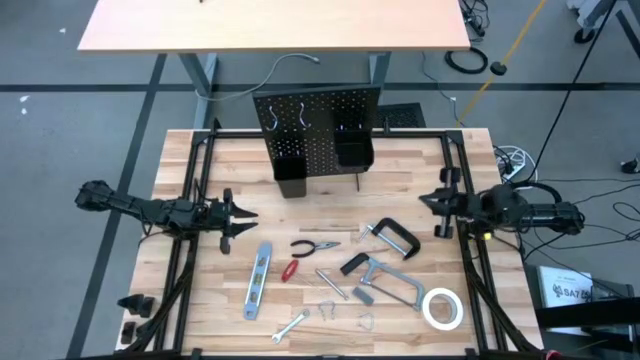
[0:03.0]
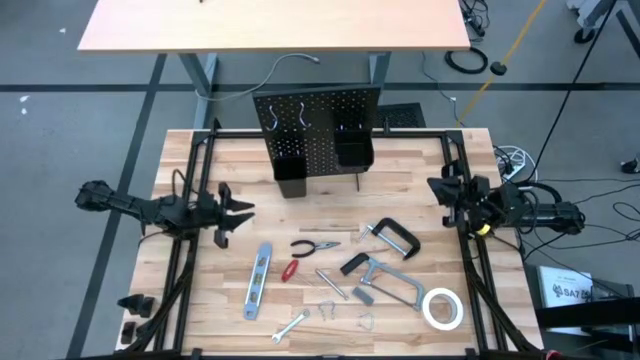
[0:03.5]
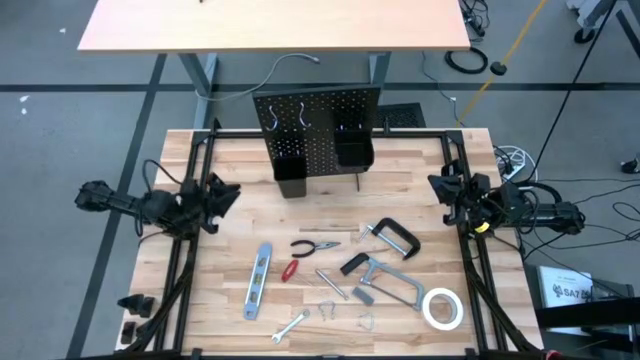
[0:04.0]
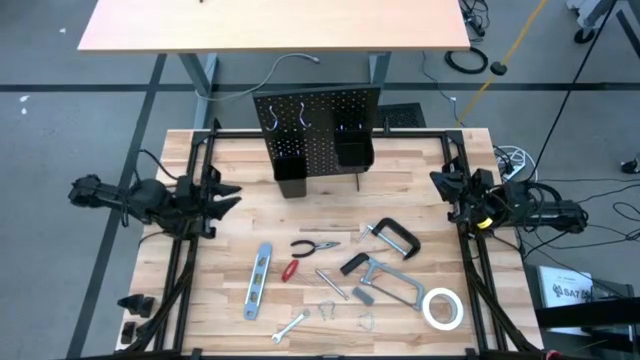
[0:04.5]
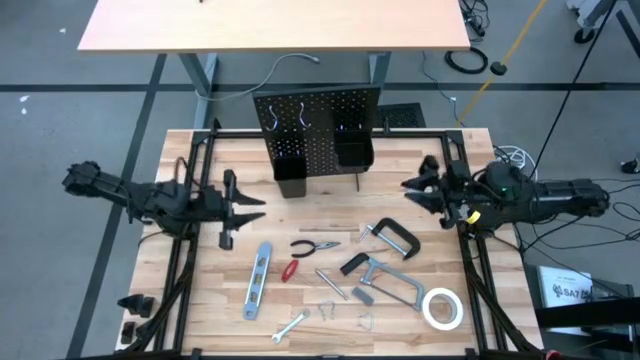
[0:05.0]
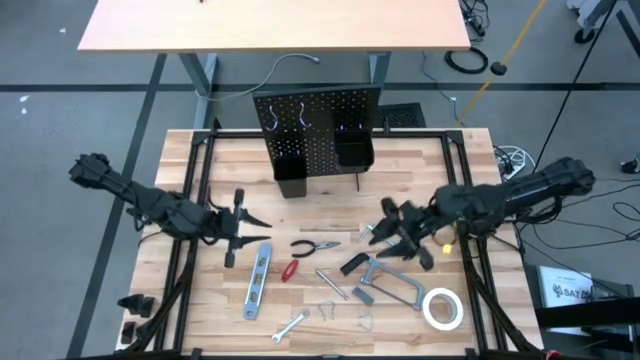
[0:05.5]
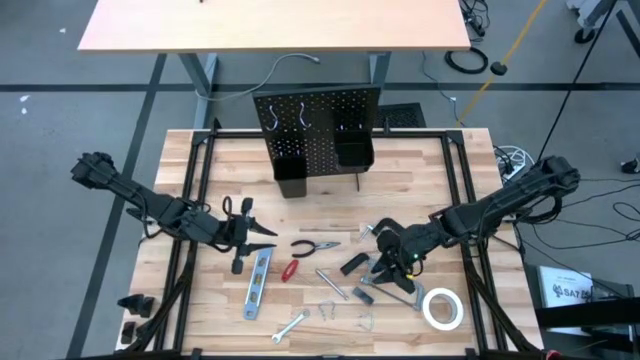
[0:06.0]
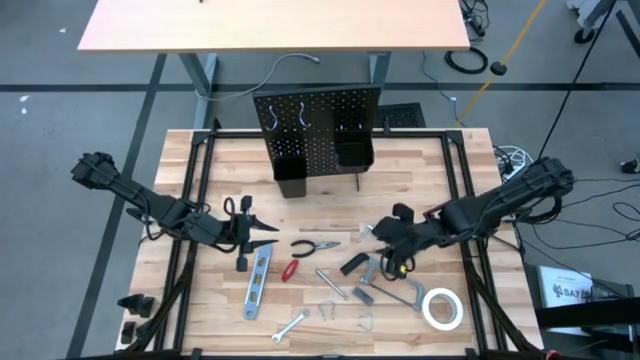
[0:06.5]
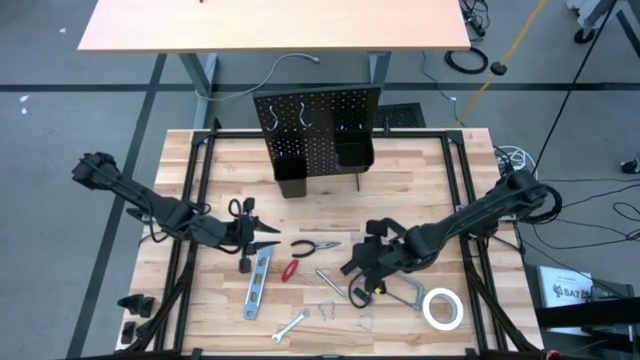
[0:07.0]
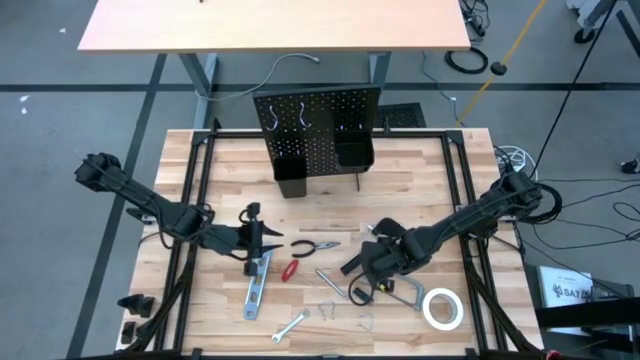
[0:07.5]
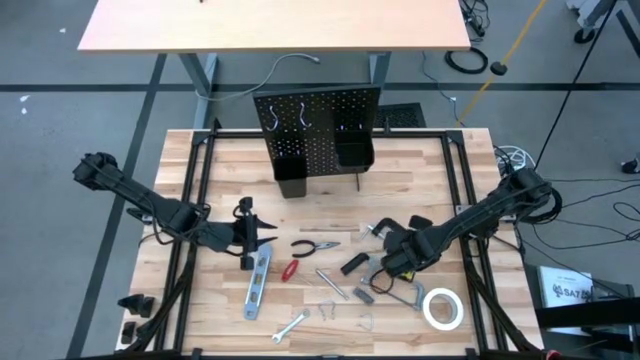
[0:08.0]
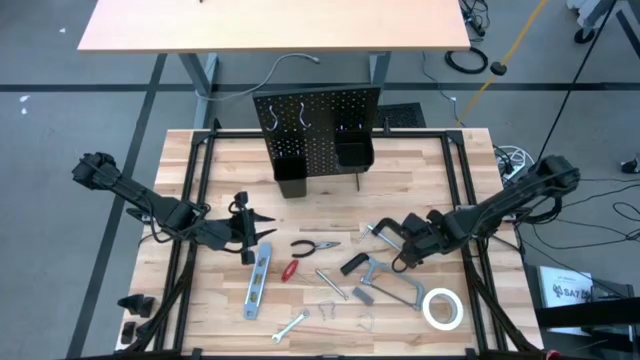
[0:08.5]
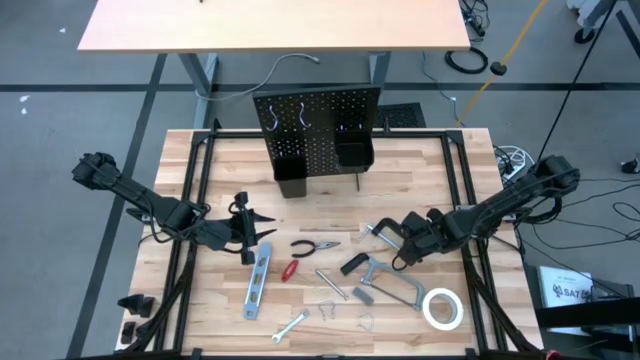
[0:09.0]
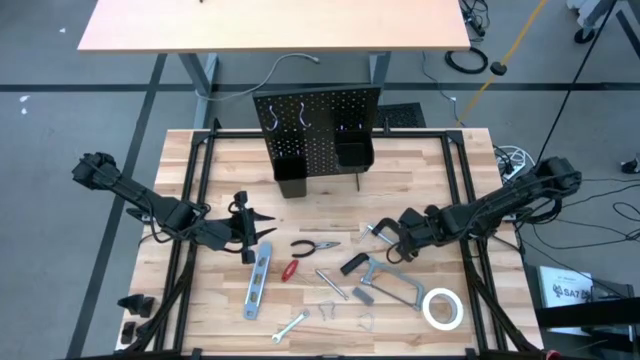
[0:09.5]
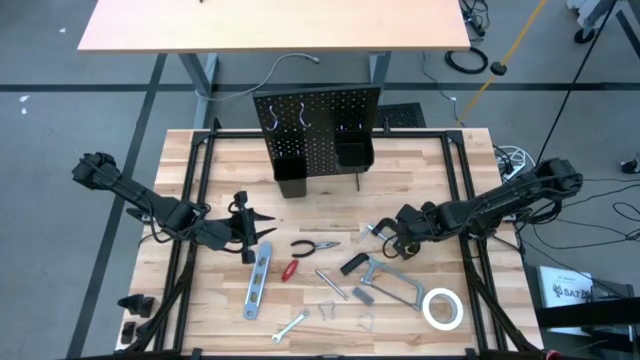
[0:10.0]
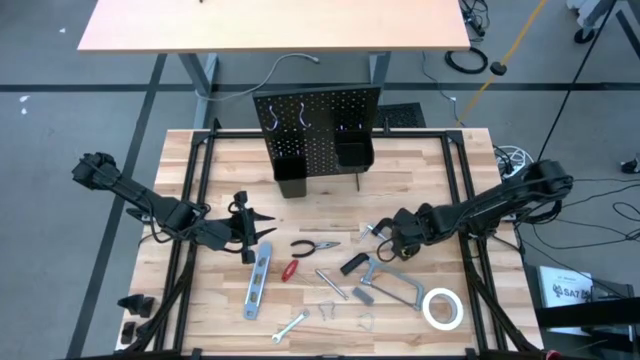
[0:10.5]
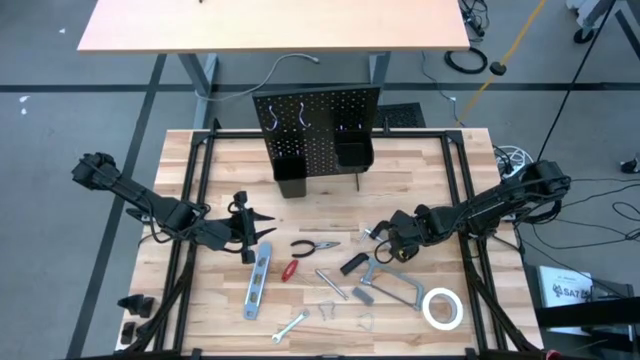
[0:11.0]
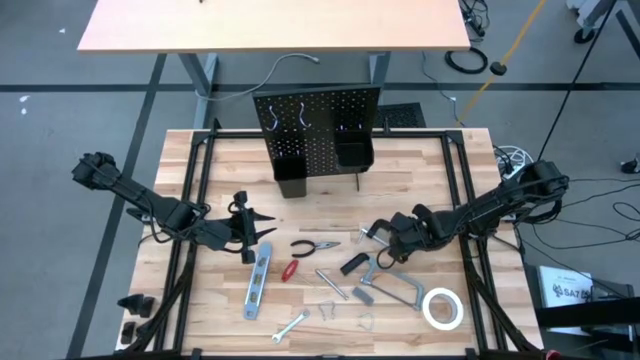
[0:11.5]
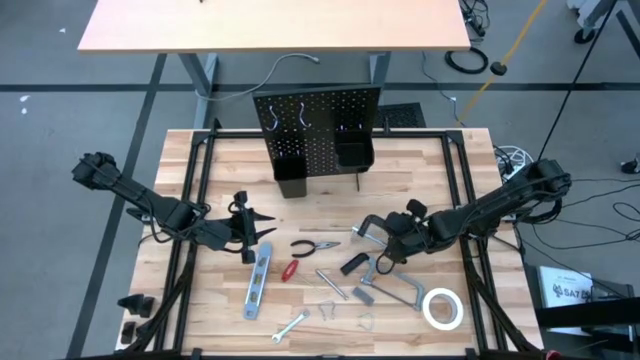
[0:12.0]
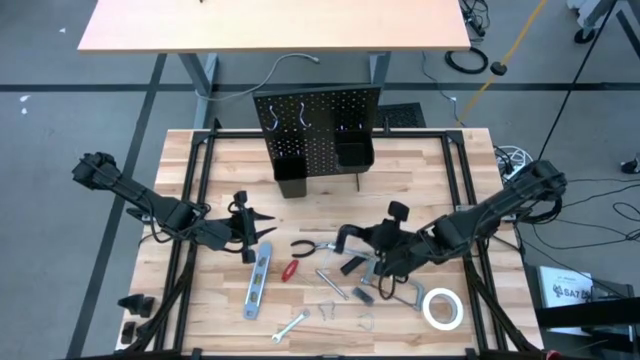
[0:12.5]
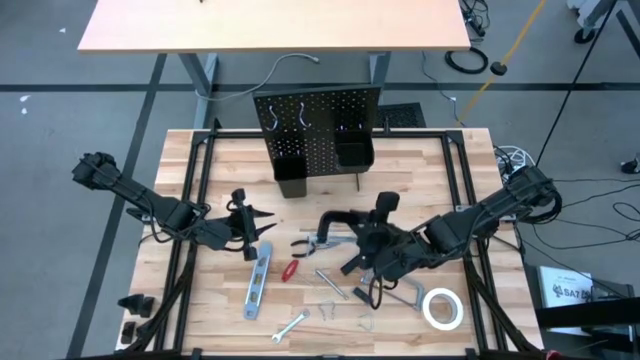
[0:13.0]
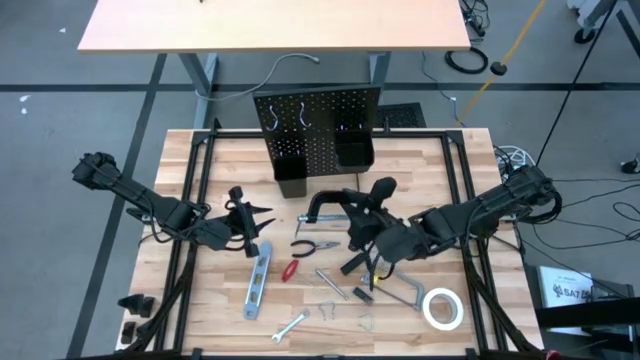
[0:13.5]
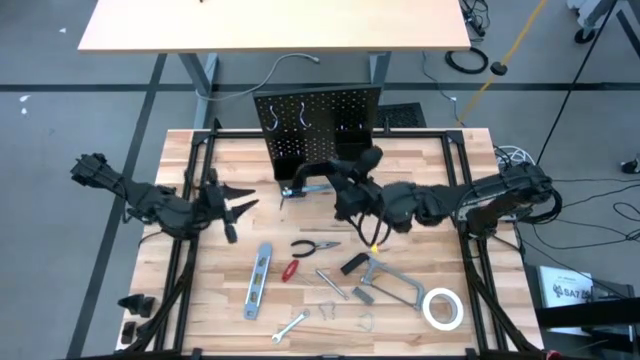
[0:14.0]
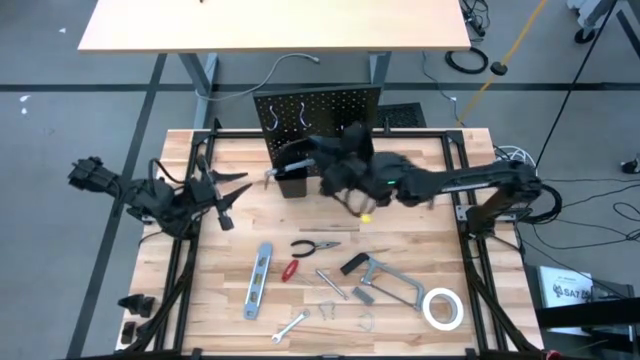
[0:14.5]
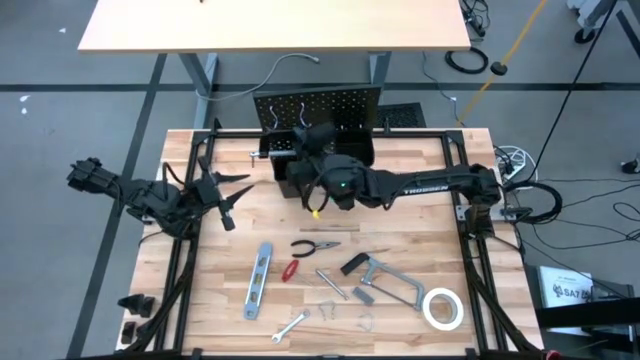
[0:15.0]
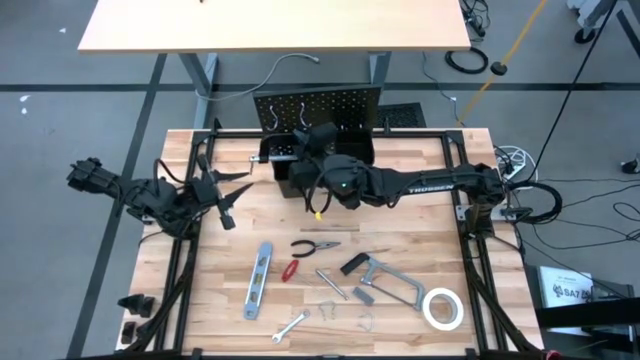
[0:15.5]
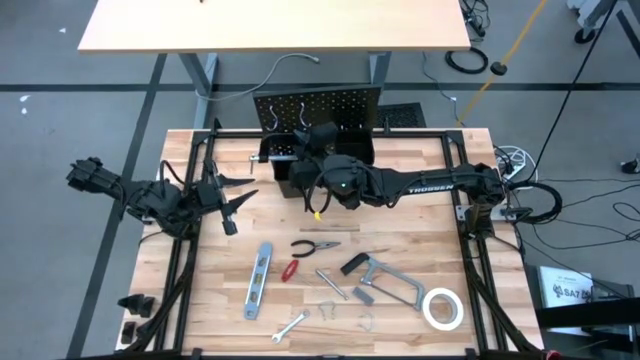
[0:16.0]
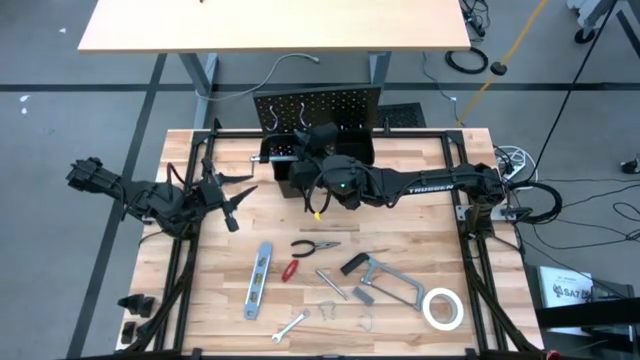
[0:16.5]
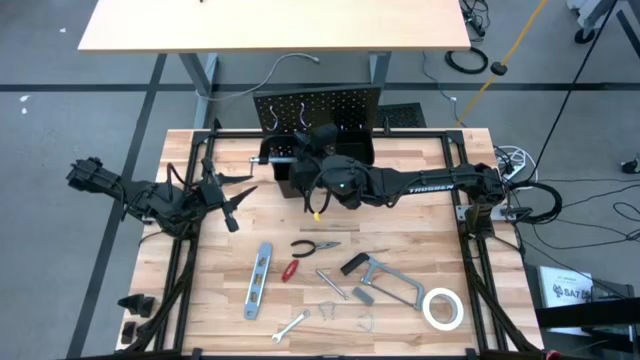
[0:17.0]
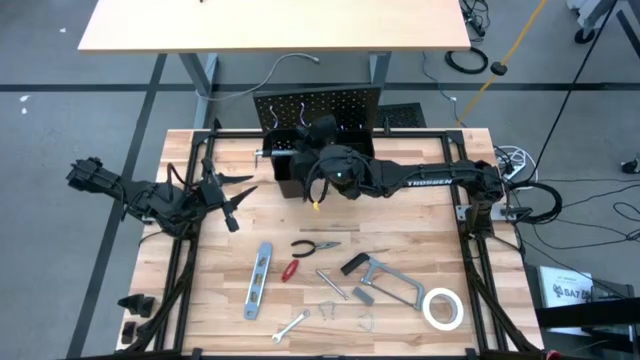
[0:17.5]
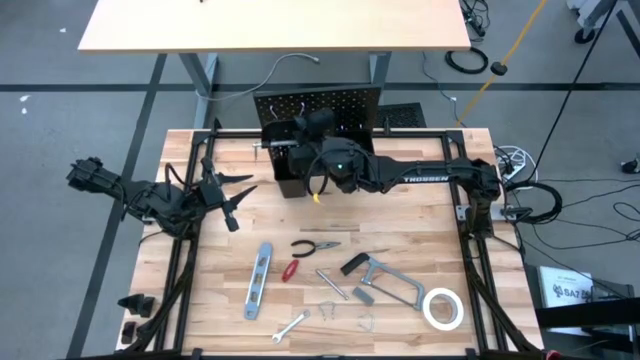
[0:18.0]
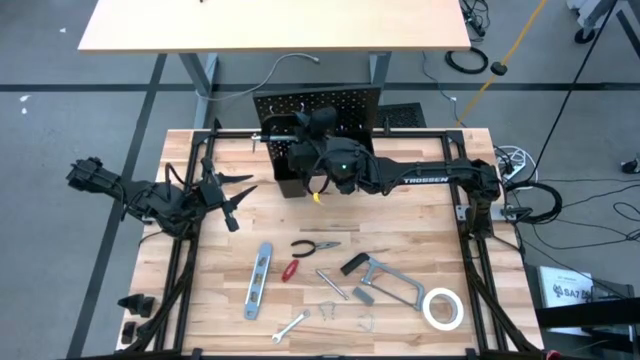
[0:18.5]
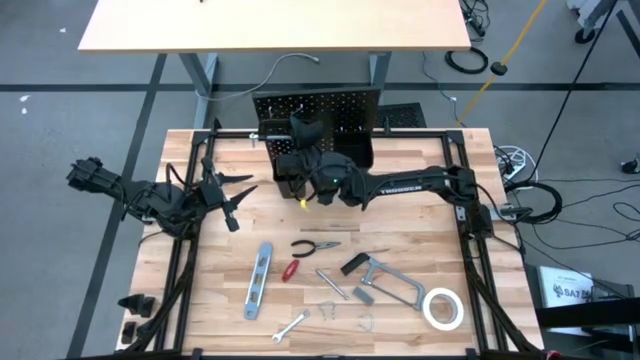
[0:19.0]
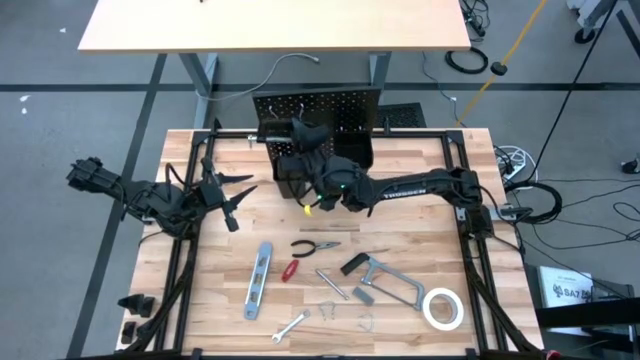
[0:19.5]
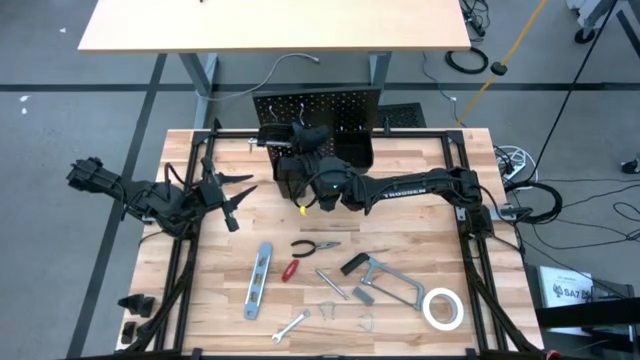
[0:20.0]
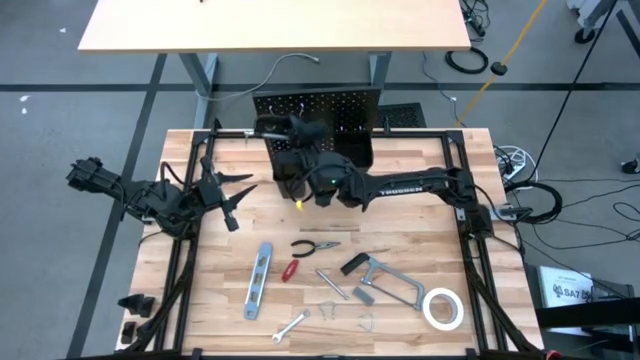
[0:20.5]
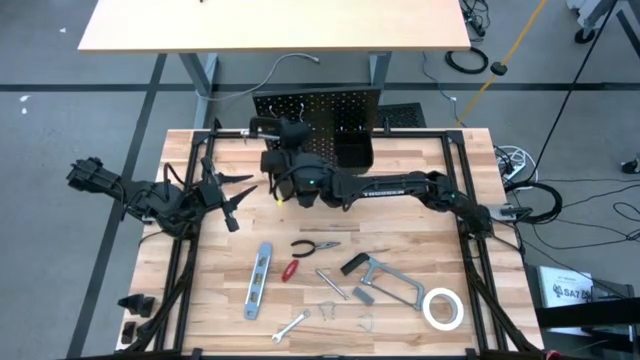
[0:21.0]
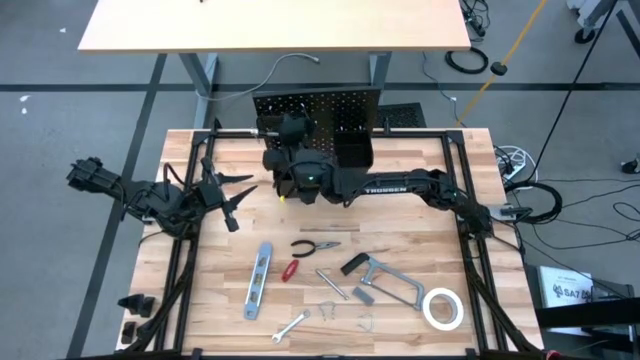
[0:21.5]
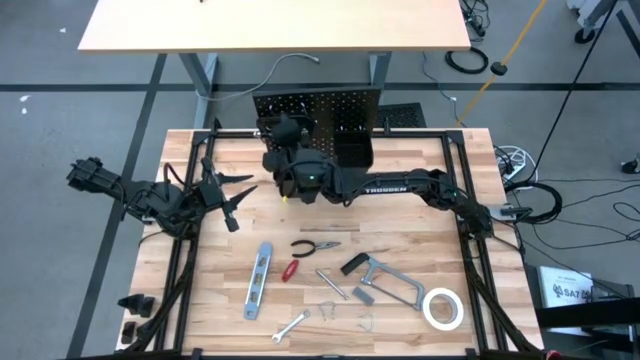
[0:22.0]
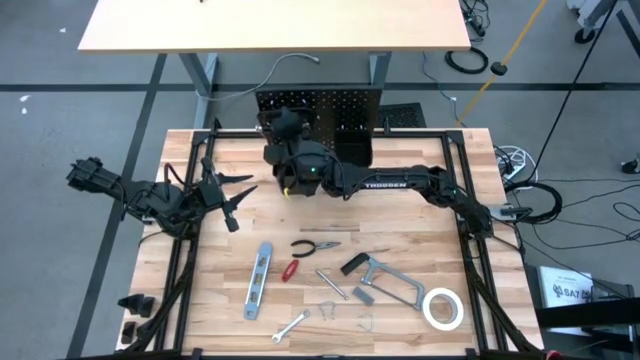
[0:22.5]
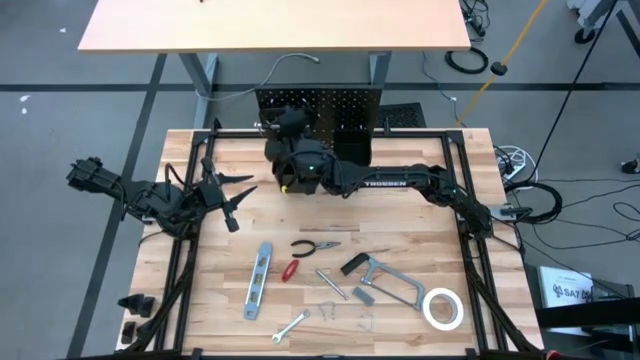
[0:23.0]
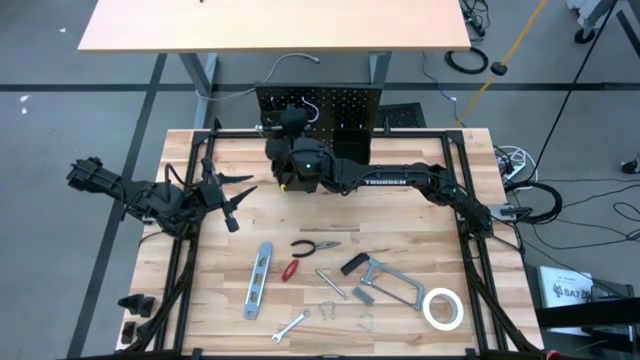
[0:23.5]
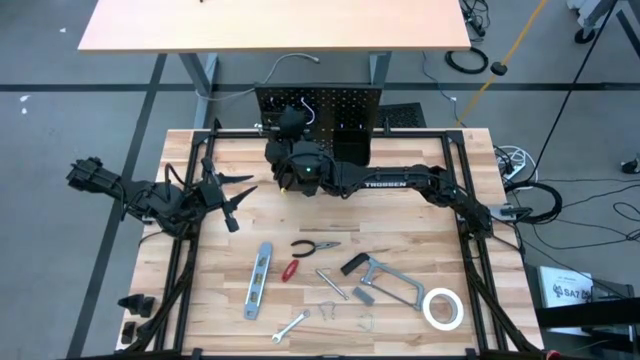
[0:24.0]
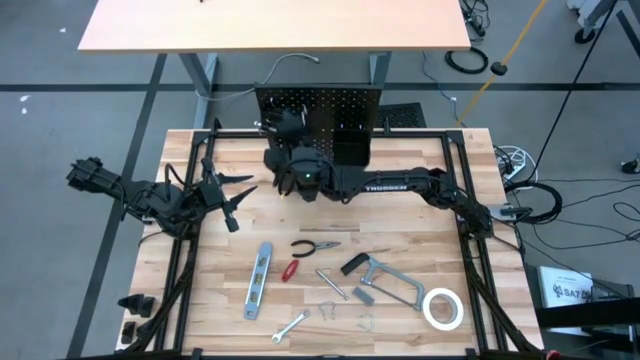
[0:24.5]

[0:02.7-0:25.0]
Task: Hang tools onto peg board
Hang the clamp on the pegboard
